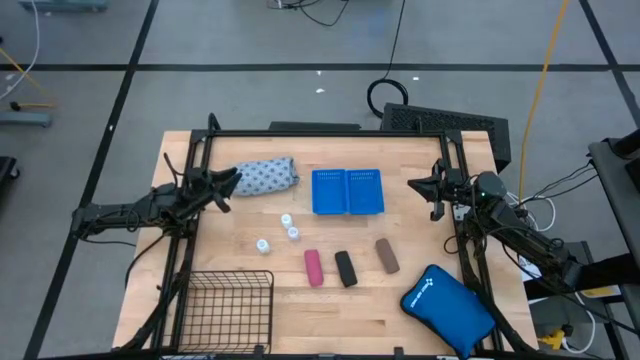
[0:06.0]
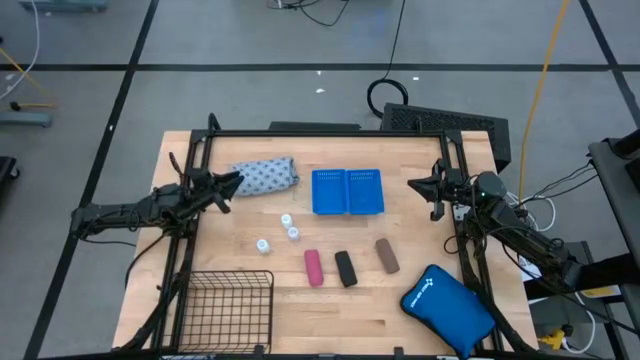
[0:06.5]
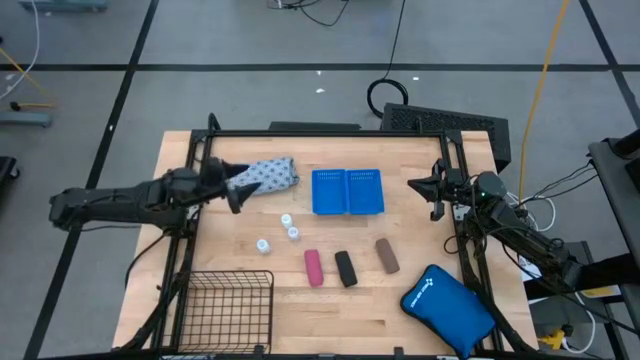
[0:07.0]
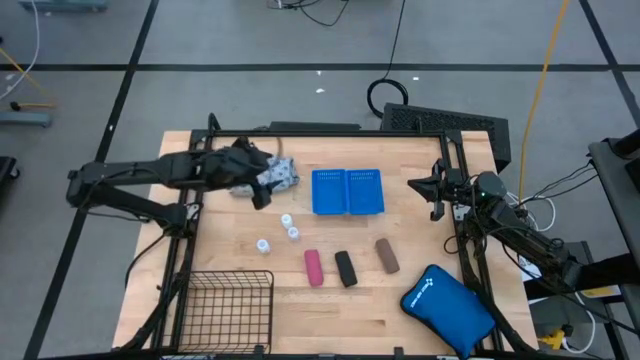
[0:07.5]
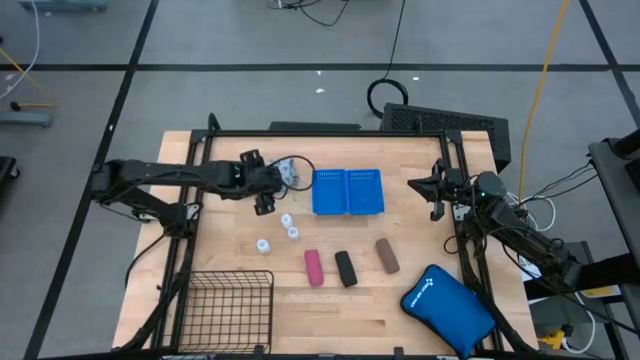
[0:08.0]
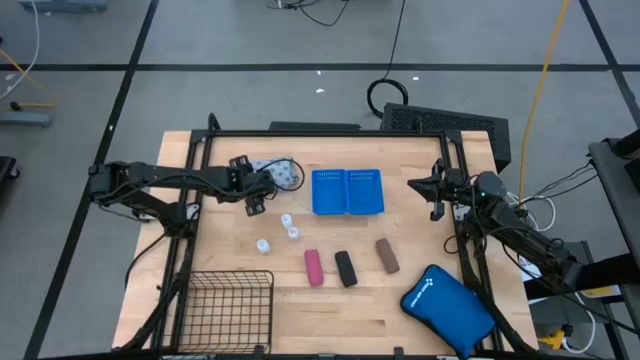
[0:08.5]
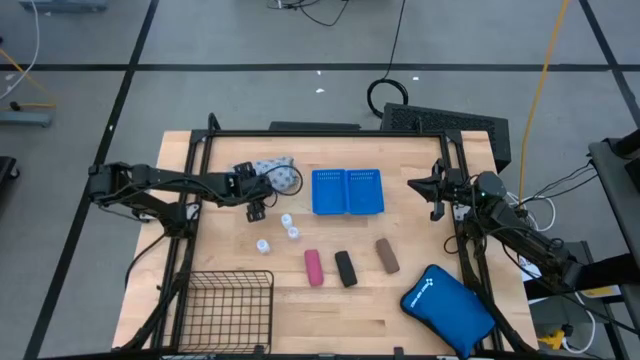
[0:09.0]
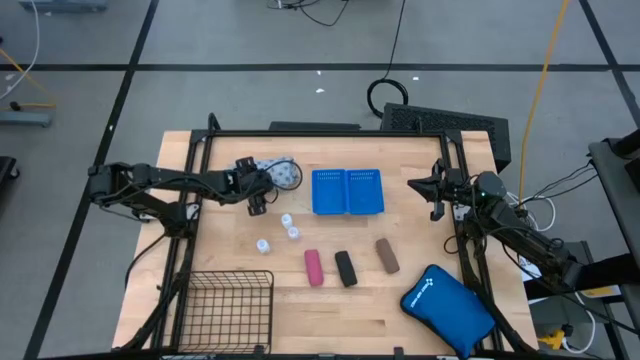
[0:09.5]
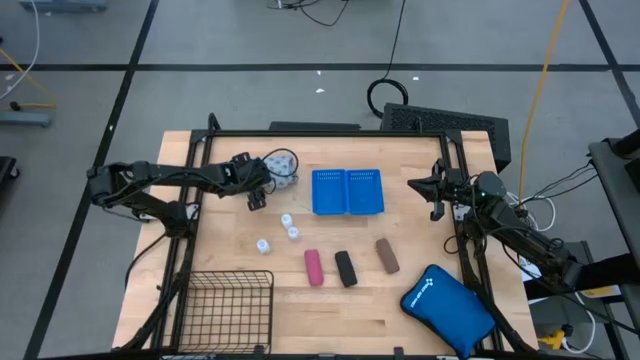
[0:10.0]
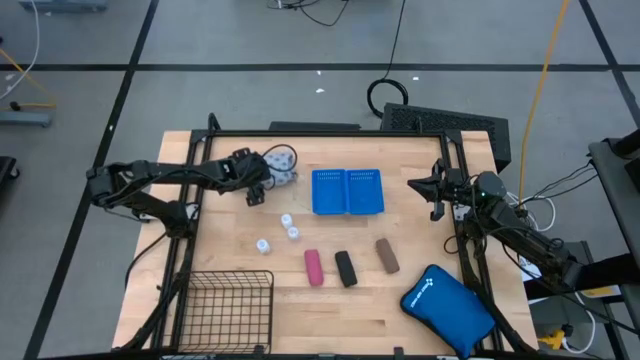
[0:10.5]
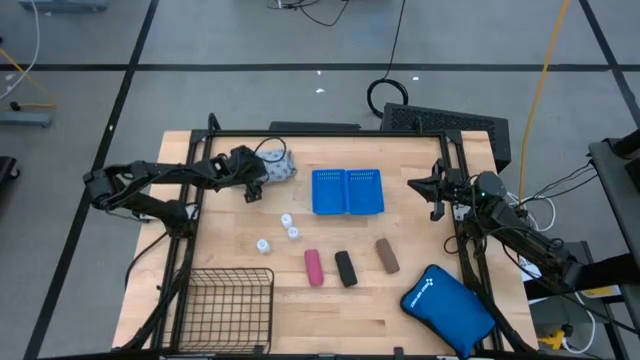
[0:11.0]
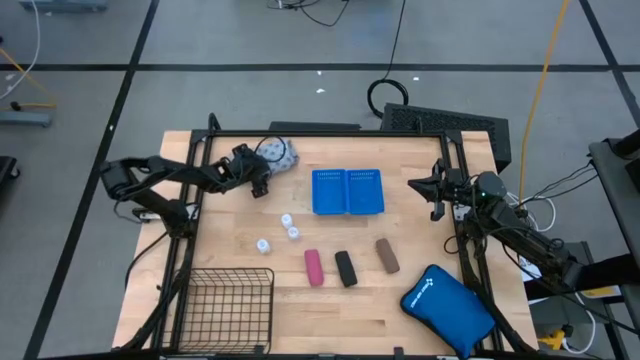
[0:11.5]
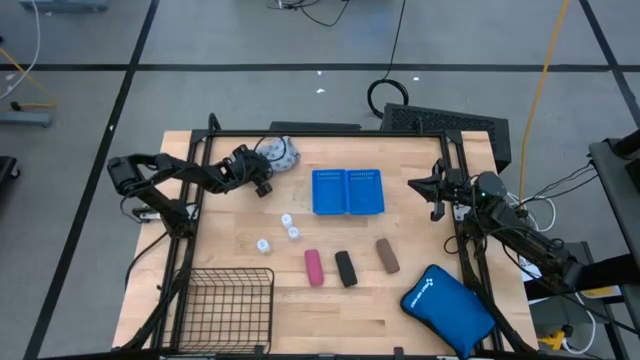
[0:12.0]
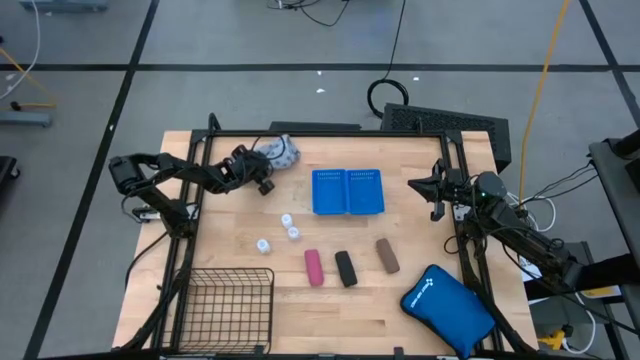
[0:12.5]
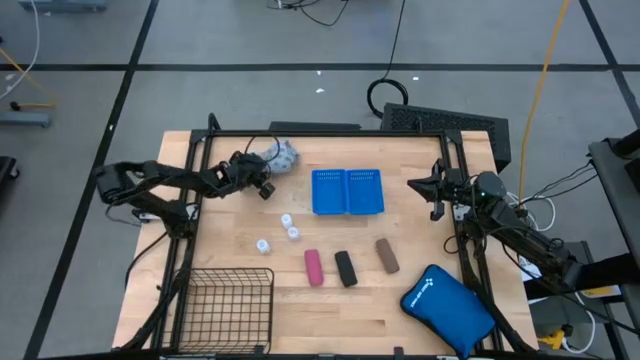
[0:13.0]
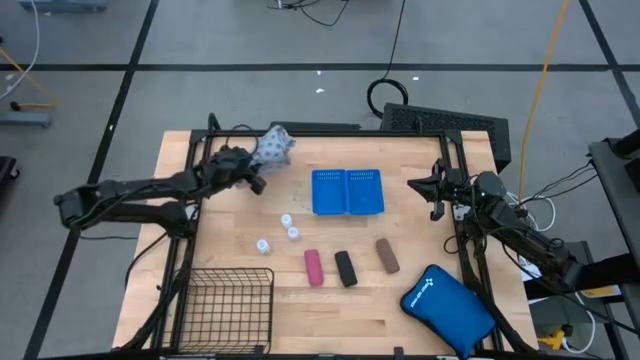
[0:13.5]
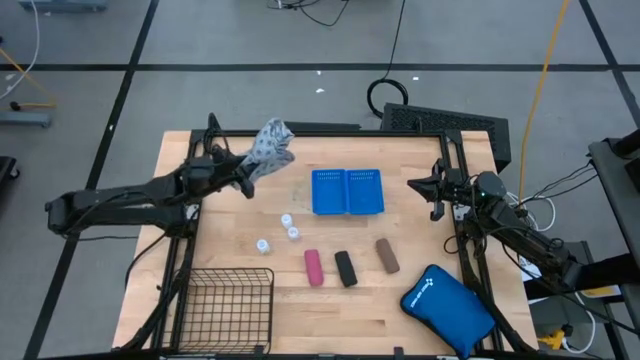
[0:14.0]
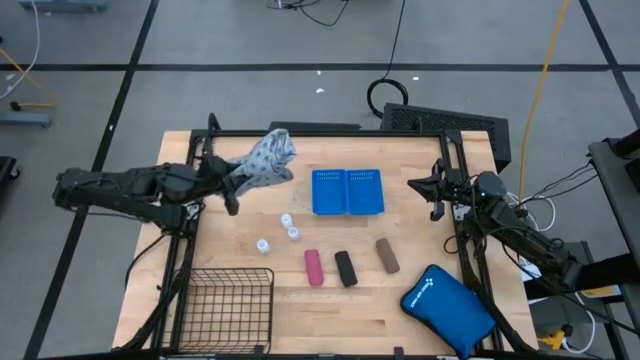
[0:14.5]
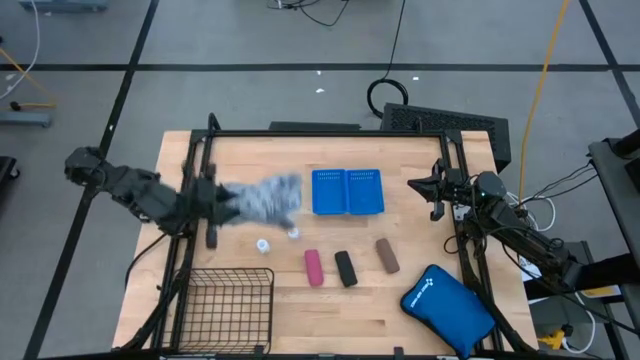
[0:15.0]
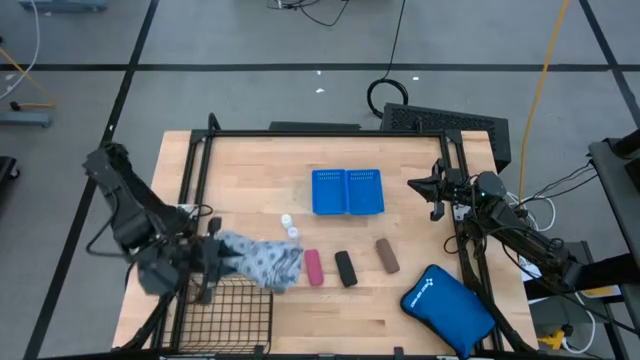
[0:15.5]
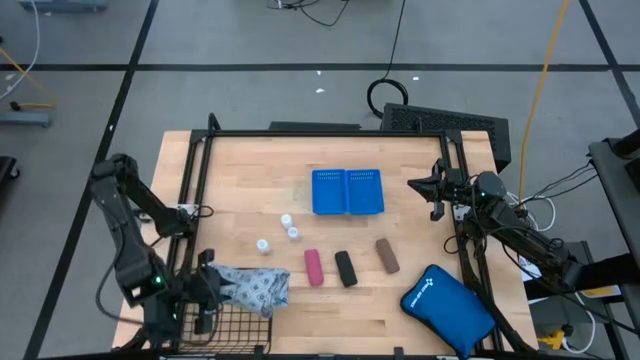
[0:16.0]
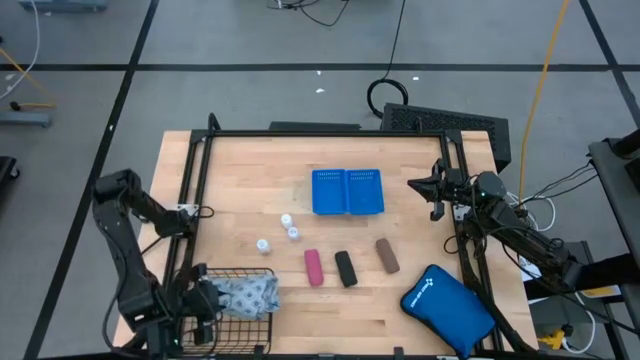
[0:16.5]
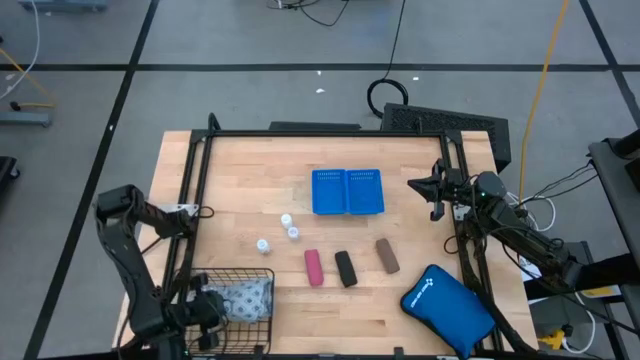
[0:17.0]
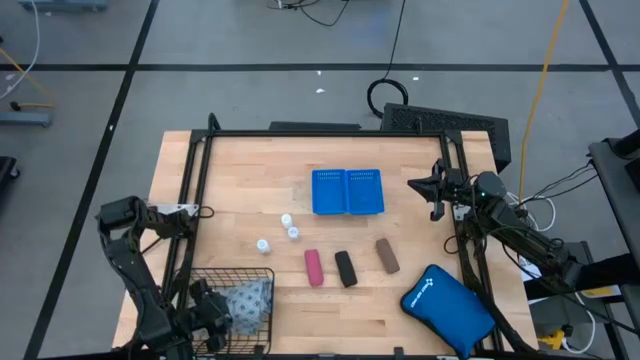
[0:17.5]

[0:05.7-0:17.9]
Task: Pick & place medical supplies in basket/bin
Put the blue patient gown into the black wire basket

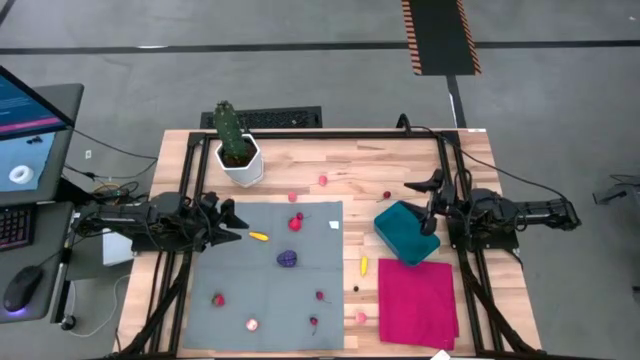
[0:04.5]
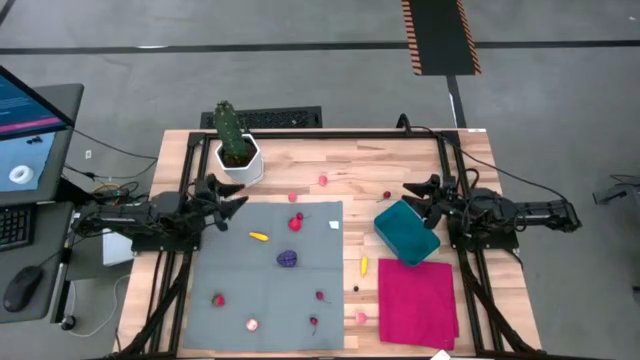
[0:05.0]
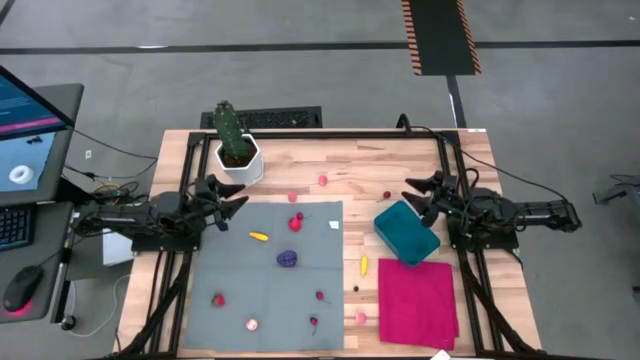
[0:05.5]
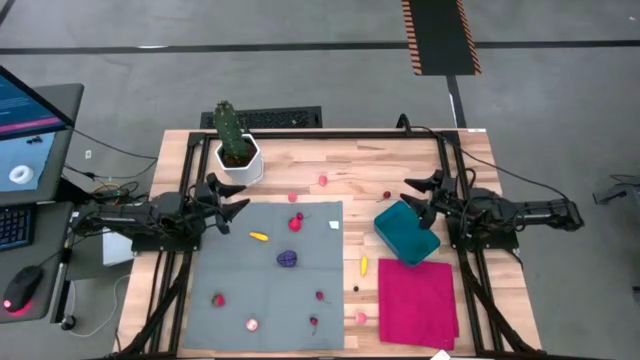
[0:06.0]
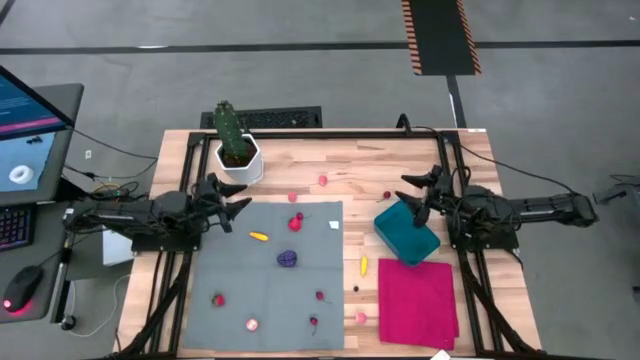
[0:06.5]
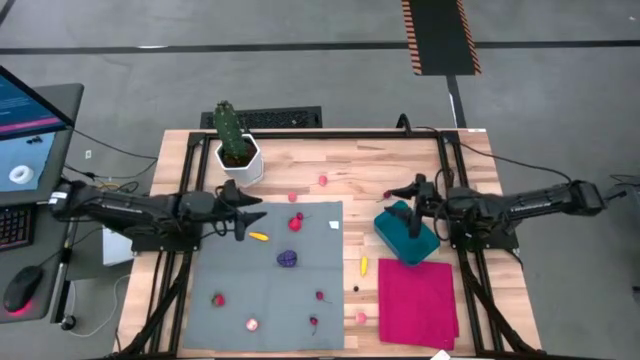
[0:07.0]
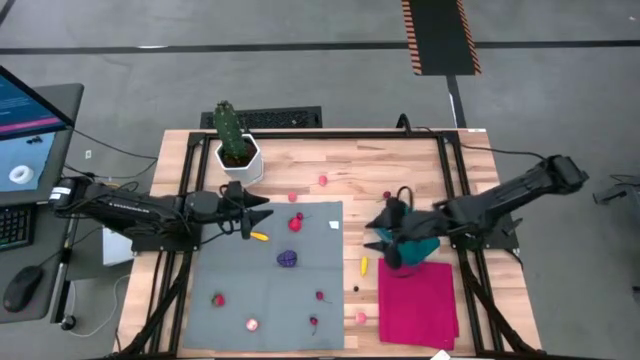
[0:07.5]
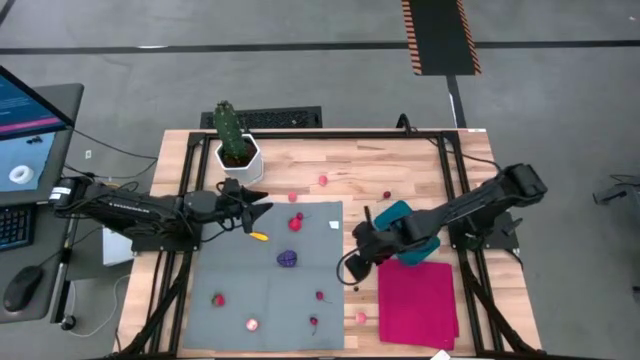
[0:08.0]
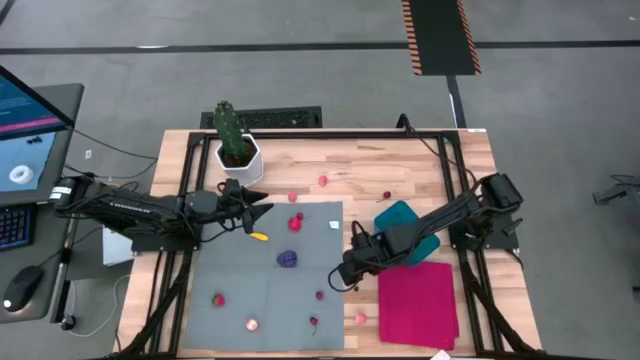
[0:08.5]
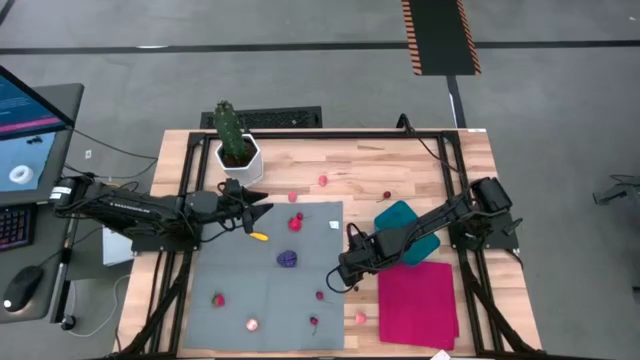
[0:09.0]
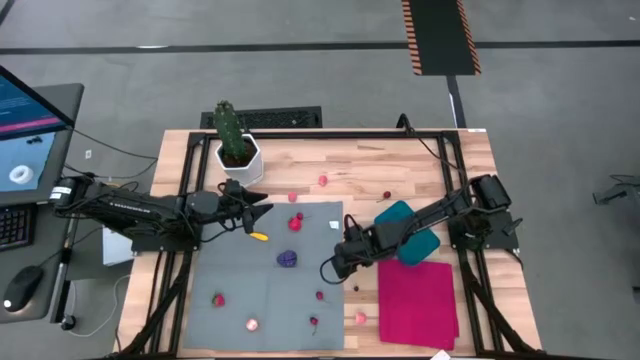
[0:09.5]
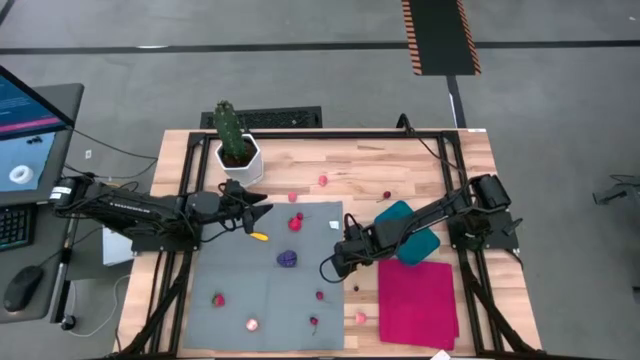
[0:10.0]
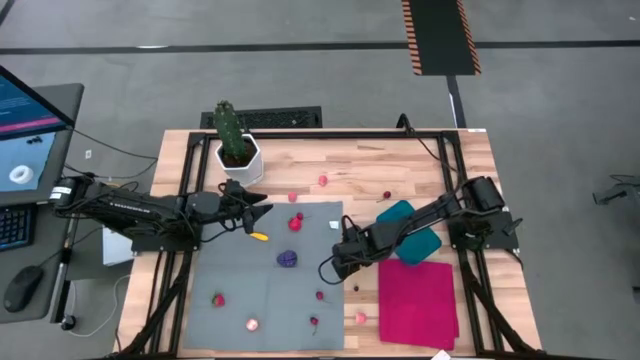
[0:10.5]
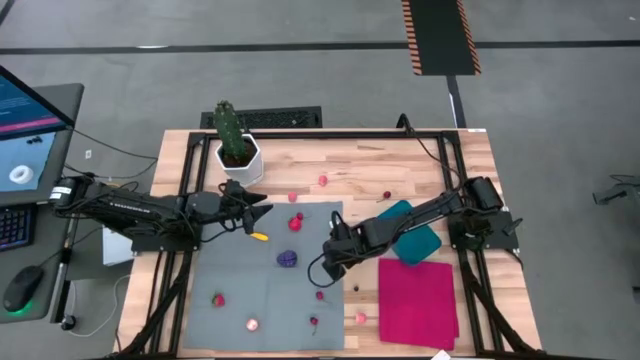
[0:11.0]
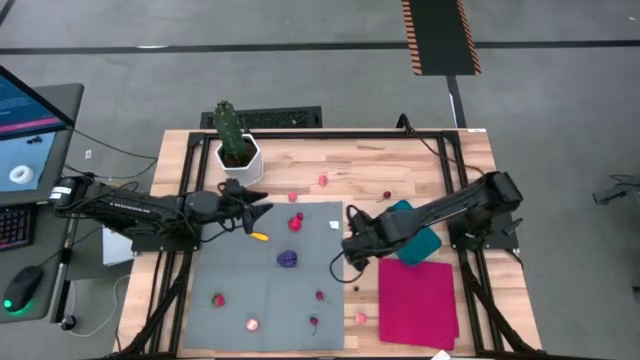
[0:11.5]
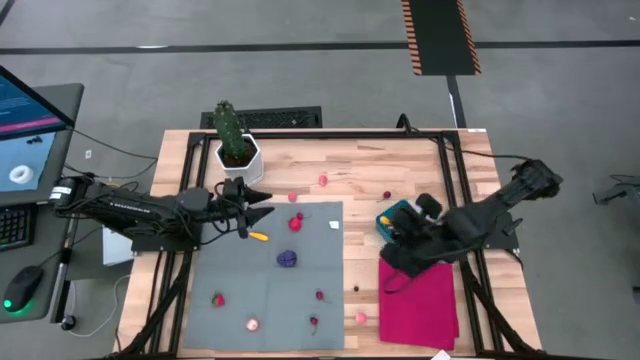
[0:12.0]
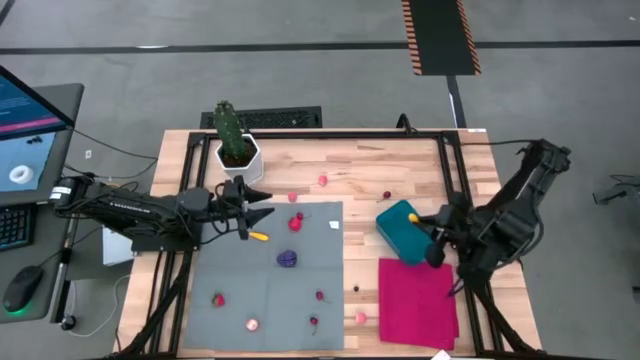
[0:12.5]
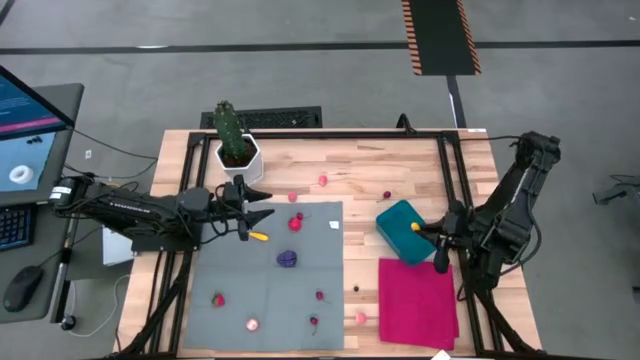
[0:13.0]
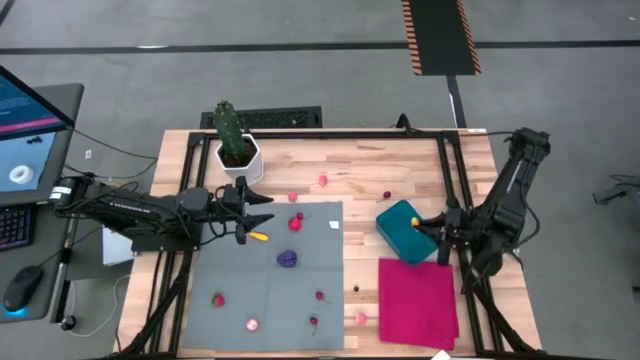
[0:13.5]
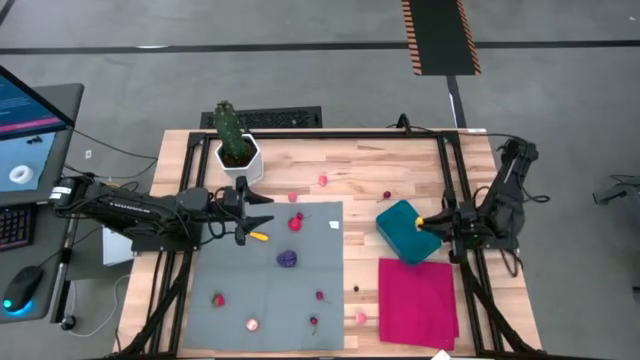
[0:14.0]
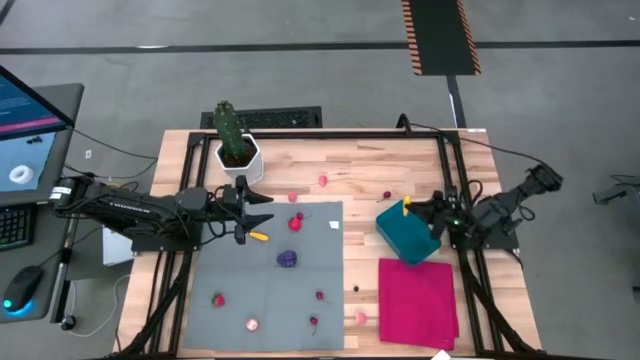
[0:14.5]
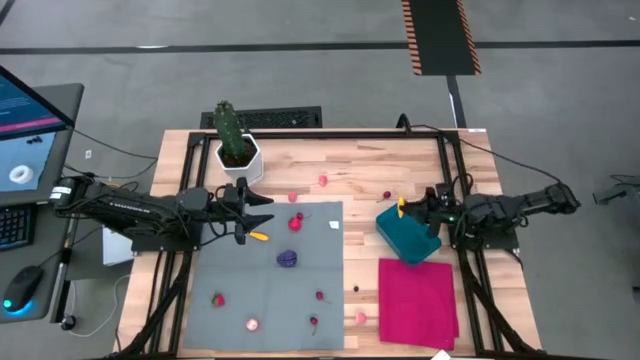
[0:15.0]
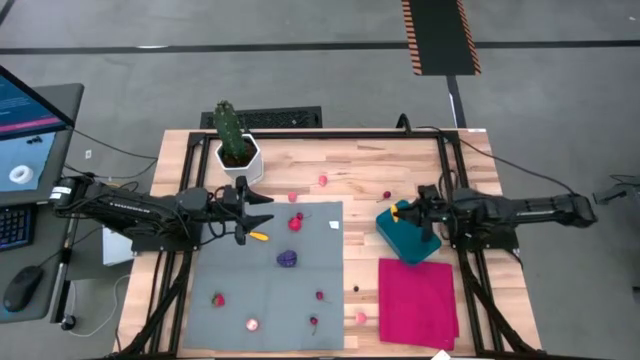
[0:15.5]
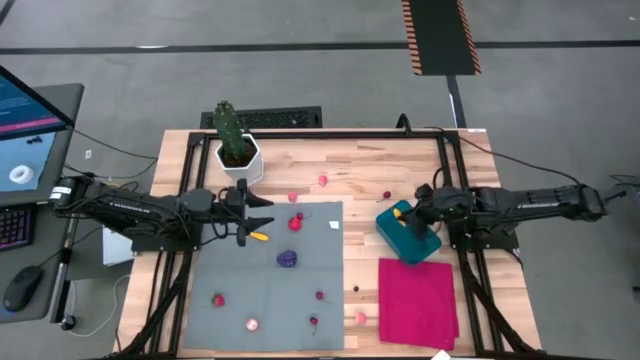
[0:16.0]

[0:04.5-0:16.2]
Task: Pick and placing Produce into tupperware
Put the yellow corn into the blue bin
